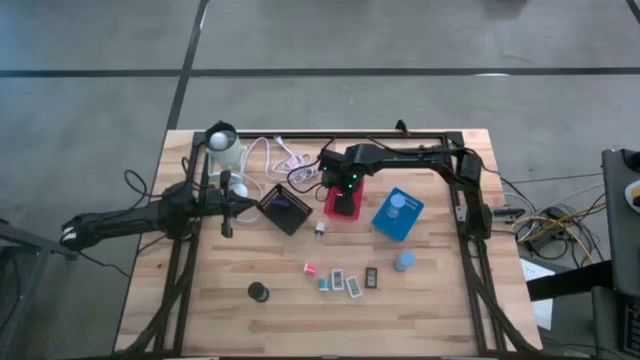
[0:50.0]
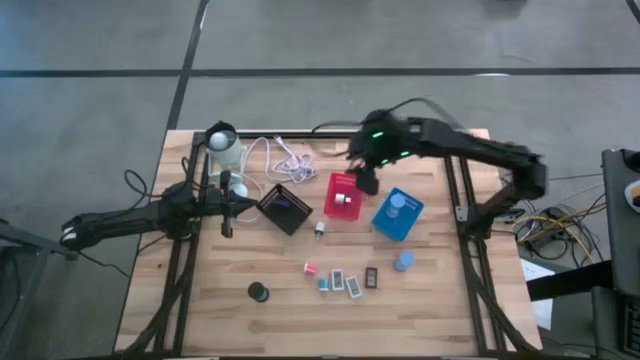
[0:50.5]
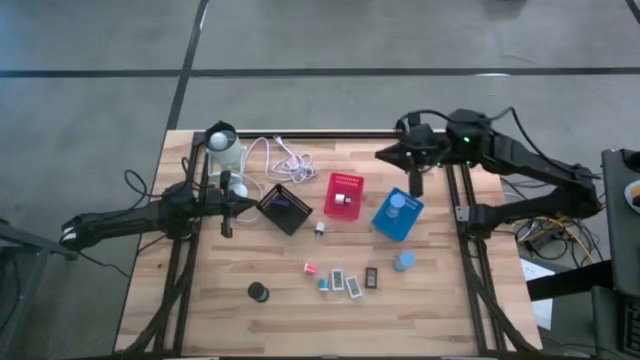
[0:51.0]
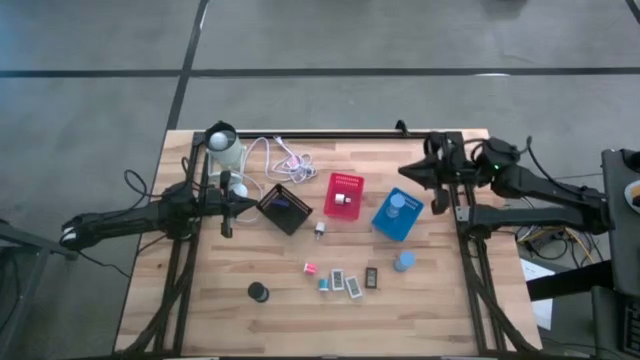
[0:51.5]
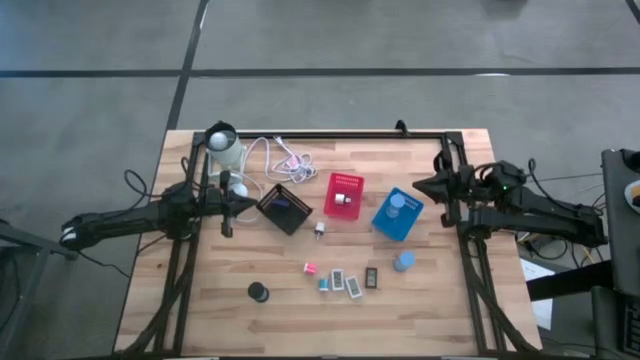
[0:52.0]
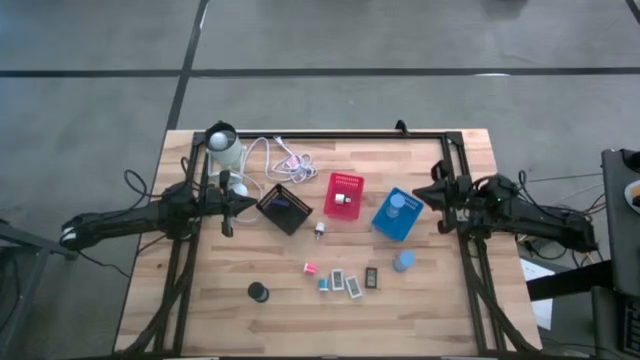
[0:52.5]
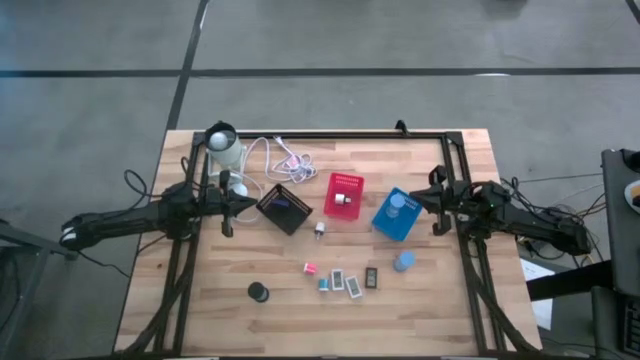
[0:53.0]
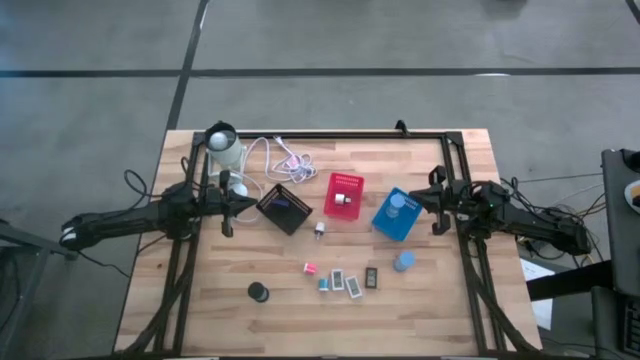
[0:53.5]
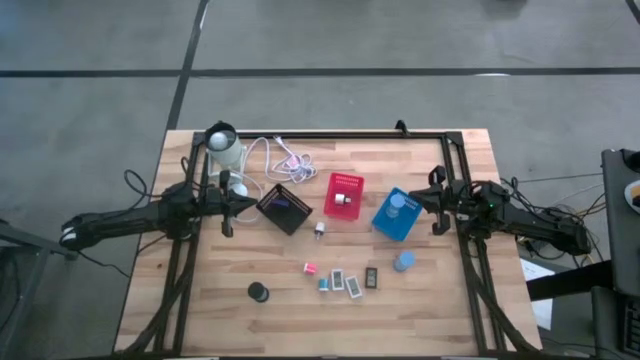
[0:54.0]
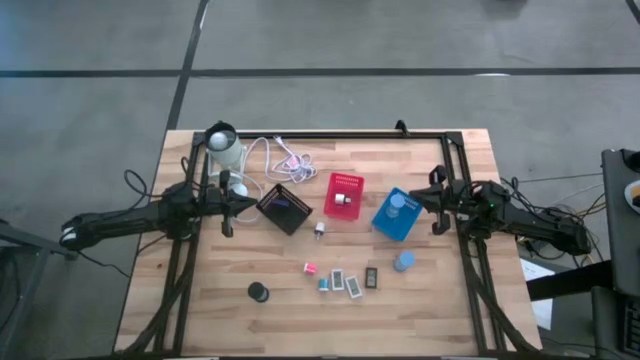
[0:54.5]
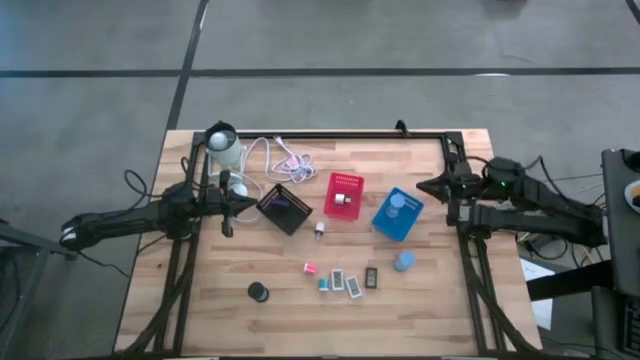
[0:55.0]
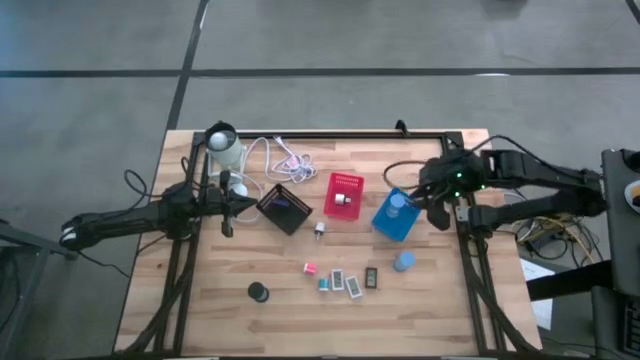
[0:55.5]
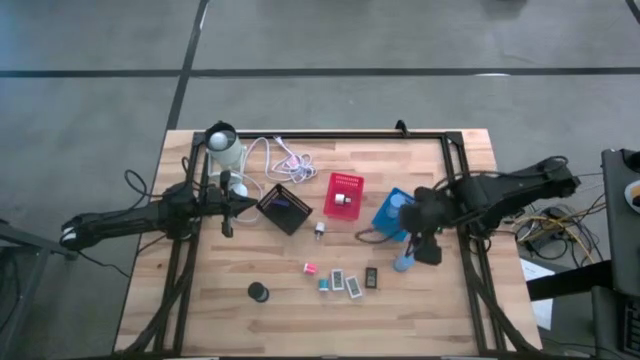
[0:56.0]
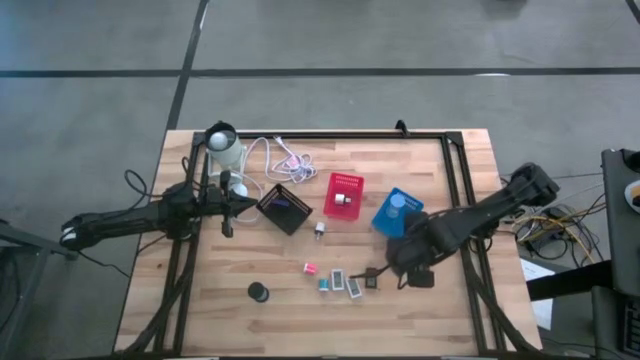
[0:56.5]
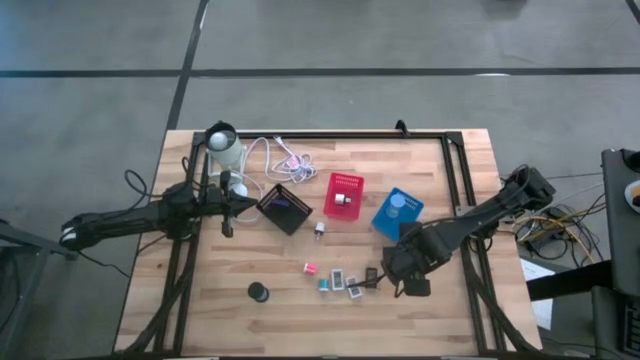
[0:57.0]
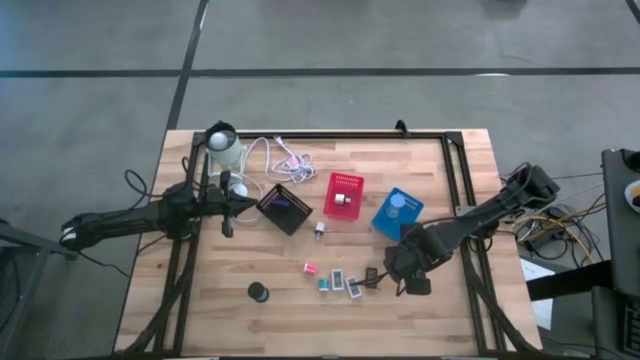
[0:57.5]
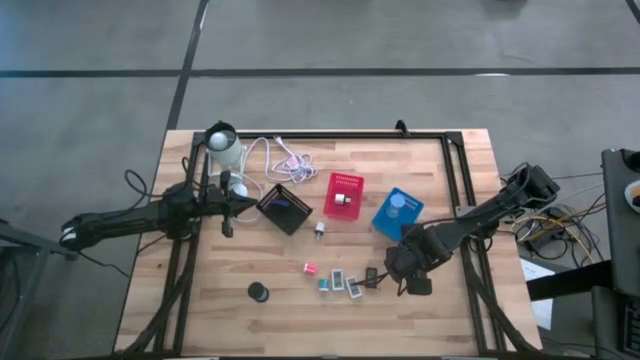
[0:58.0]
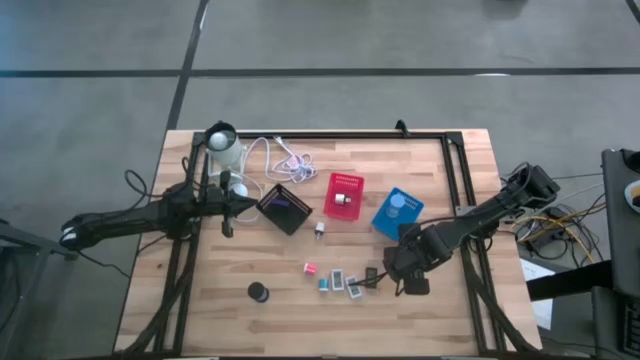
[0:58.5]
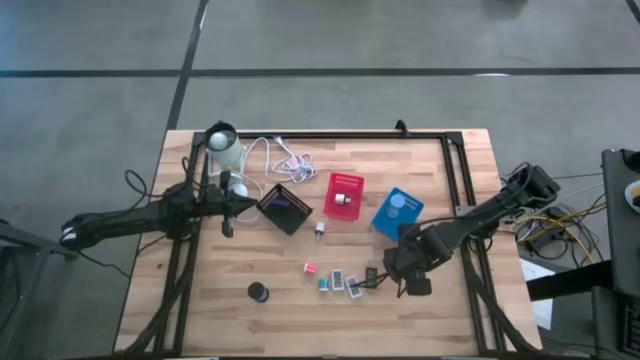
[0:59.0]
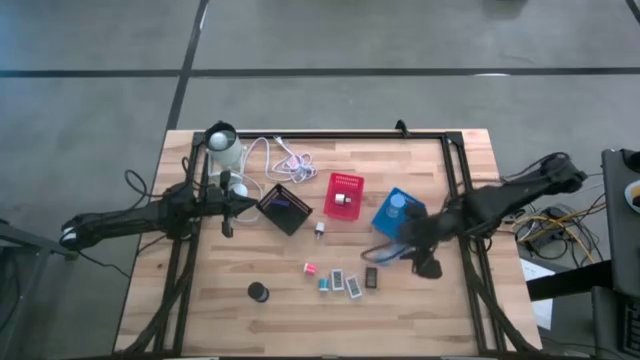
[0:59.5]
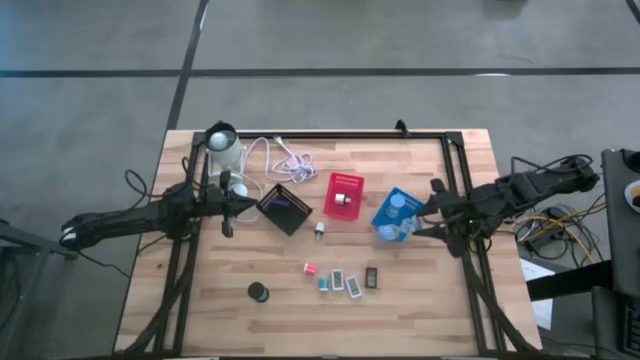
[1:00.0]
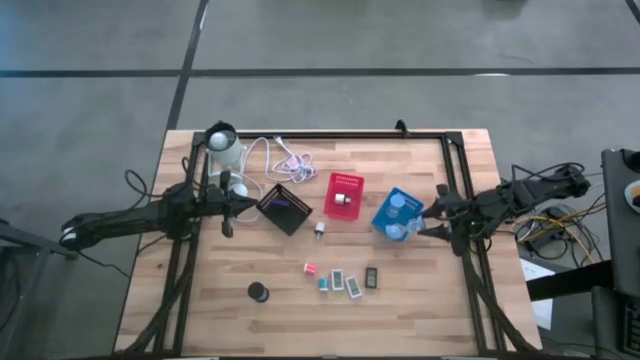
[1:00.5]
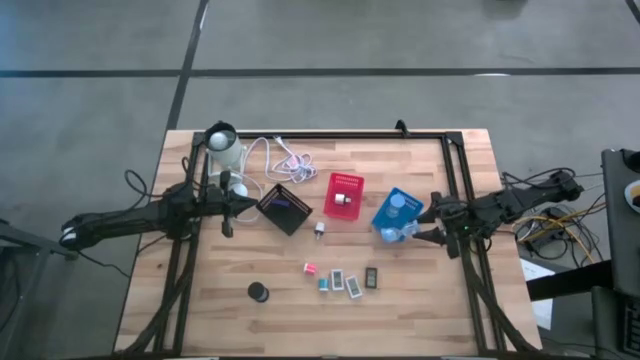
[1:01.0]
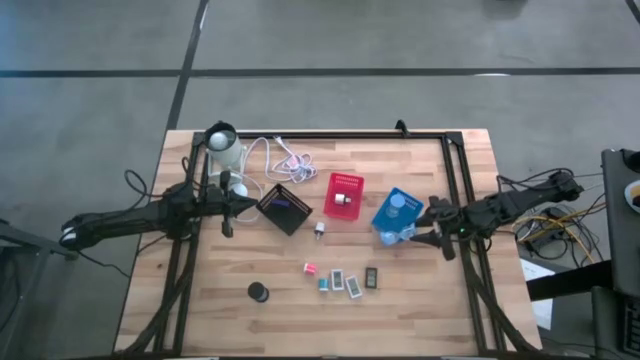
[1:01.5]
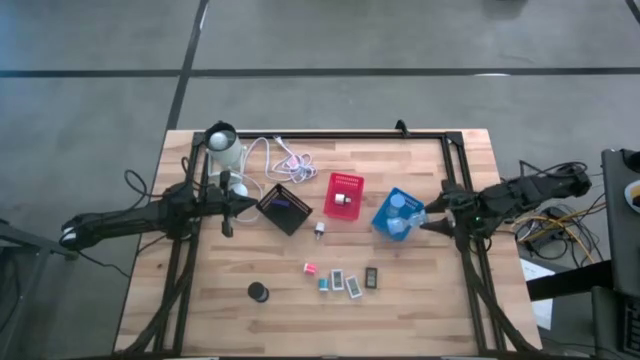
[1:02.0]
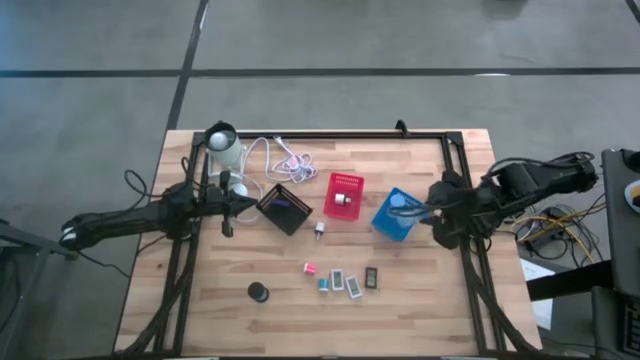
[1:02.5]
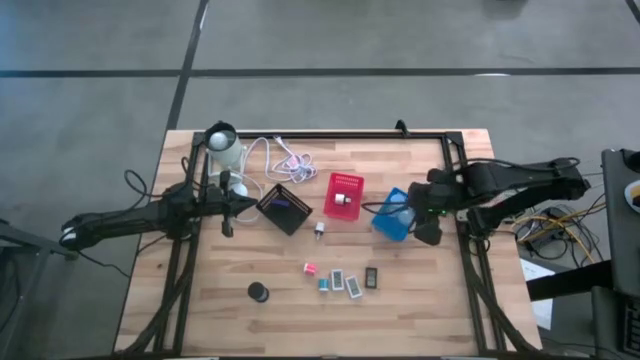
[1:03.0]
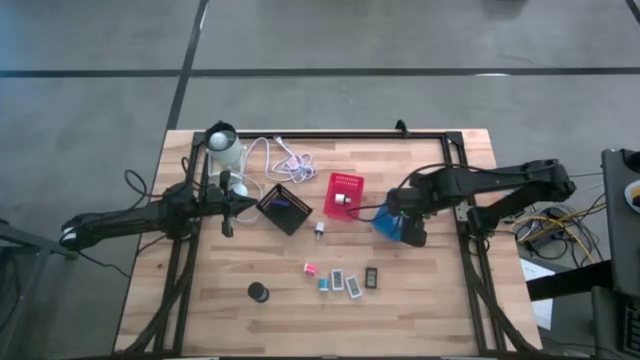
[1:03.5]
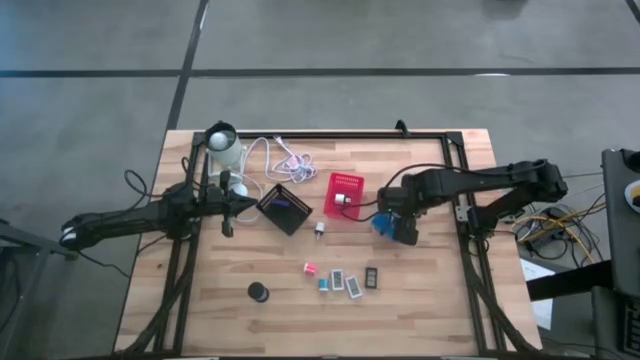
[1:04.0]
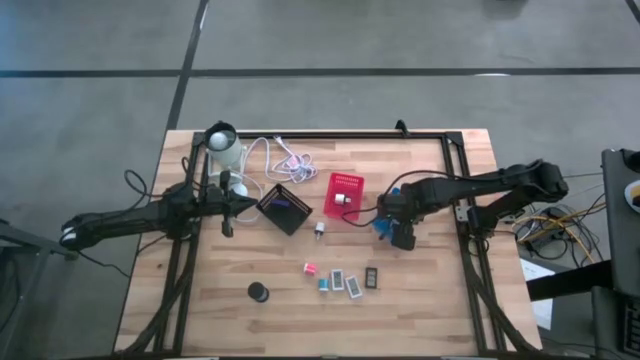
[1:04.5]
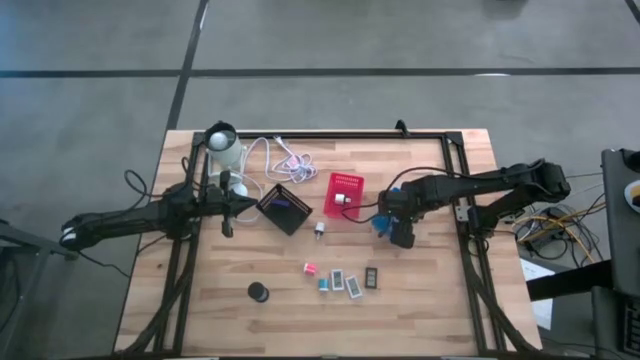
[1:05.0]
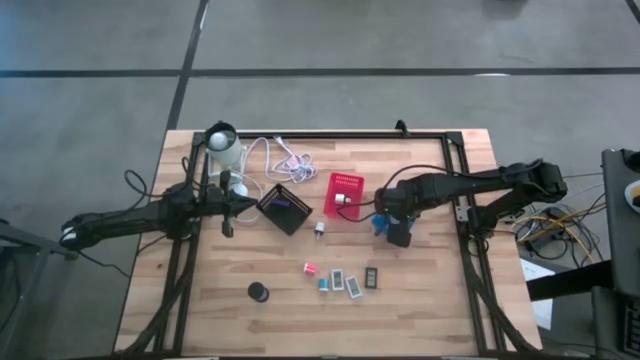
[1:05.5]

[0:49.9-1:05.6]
Task: Pick & Place Office items
Put the blue hourglass into the blue basket

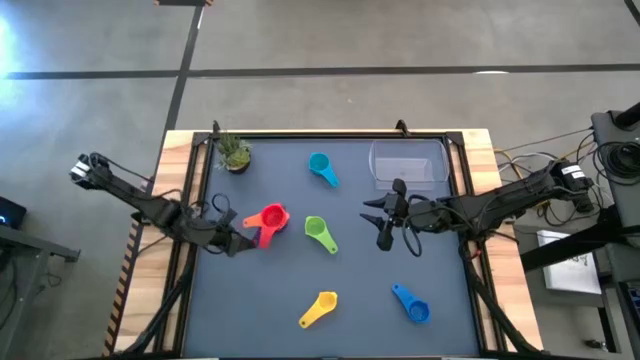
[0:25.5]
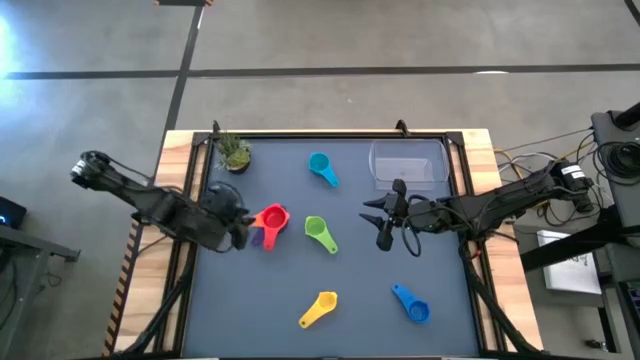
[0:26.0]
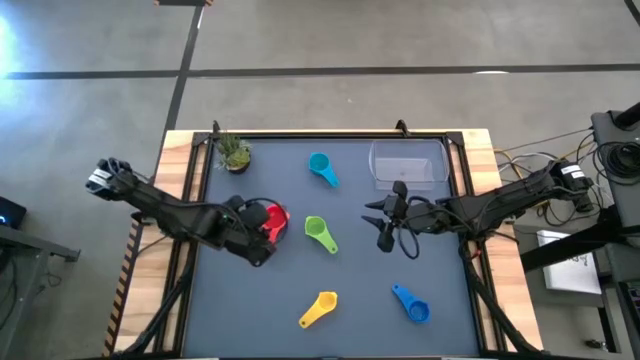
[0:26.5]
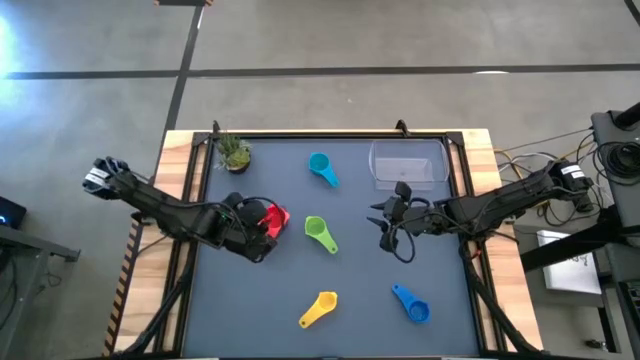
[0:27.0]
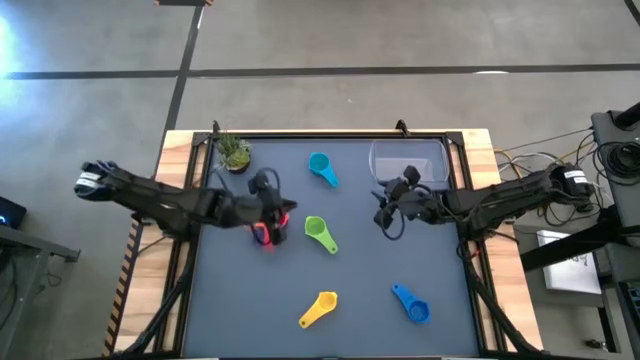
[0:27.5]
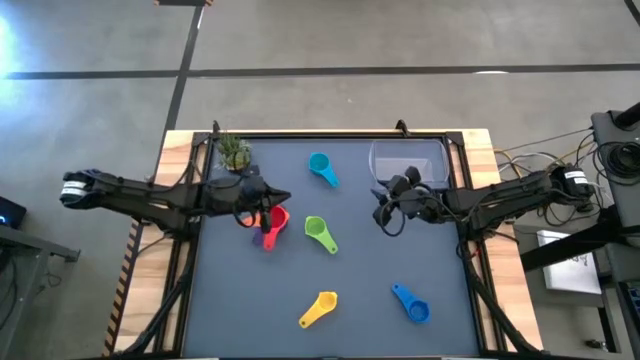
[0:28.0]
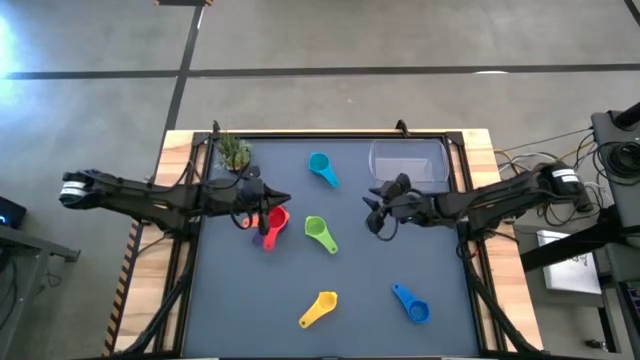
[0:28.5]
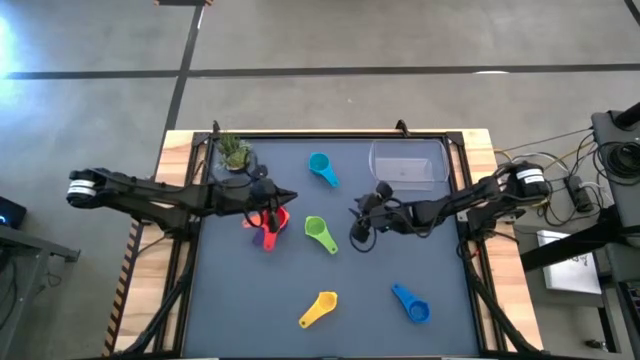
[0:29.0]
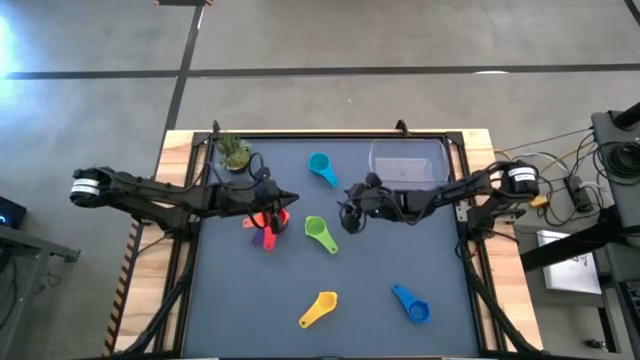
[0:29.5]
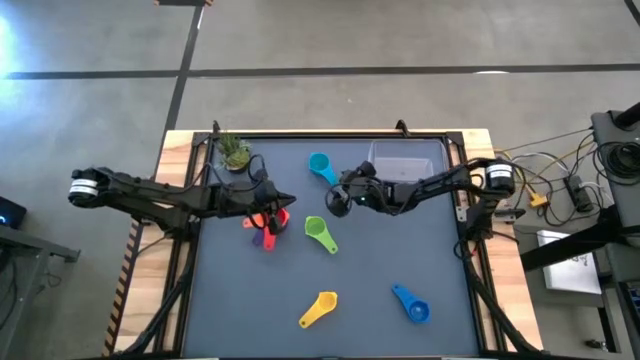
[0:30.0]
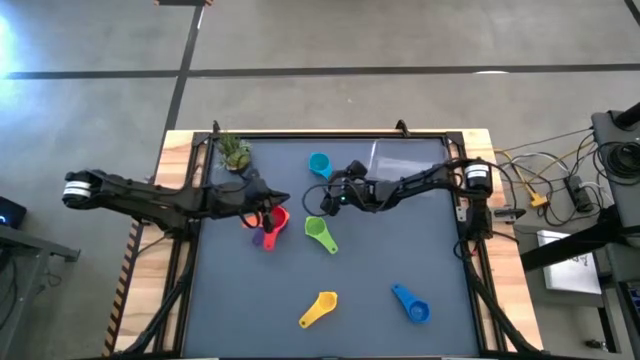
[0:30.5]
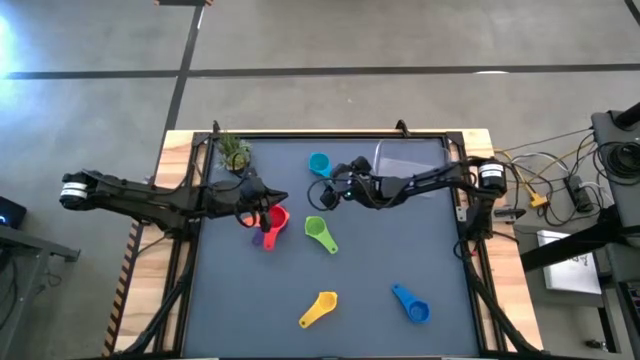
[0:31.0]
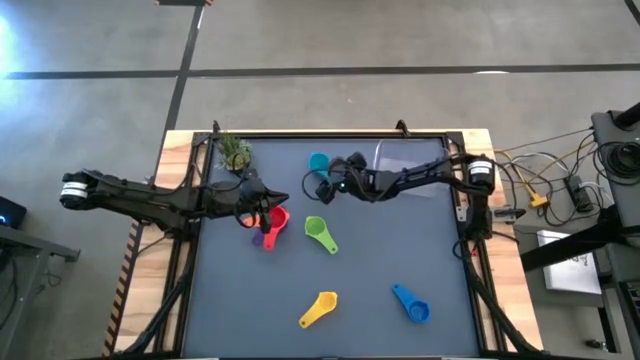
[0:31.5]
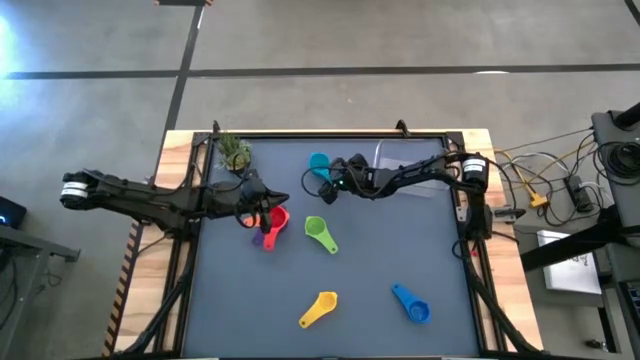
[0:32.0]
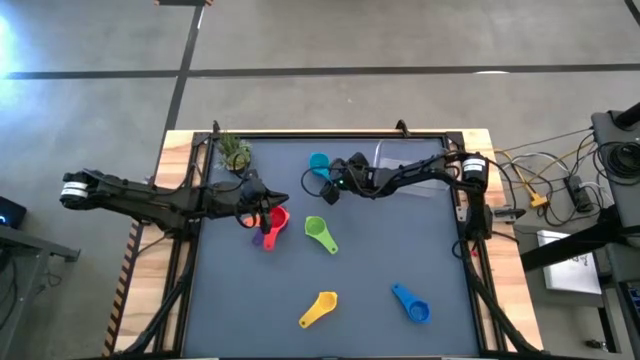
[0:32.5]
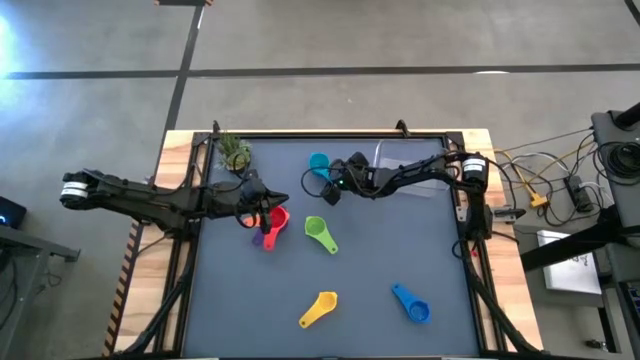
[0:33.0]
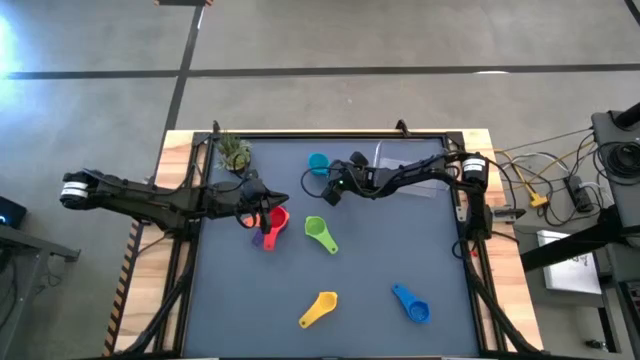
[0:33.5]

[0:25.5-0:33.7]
Task: Nest measuring cups in basket
Stack the light blue measuring cup on top of the red measuring cup
